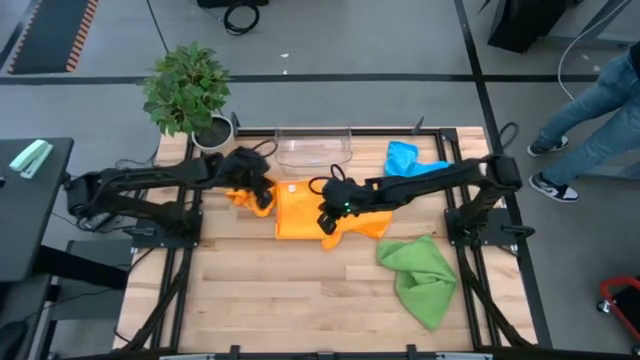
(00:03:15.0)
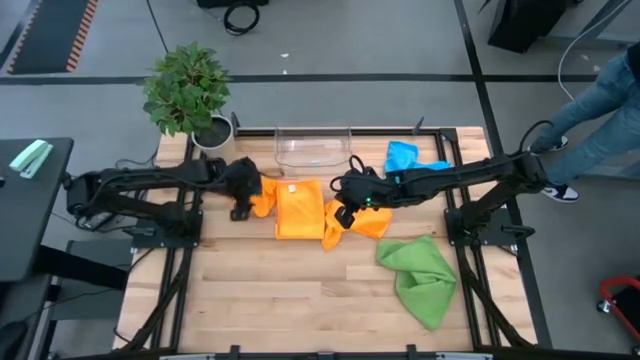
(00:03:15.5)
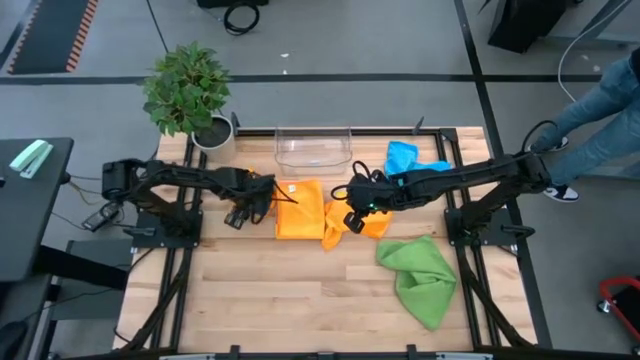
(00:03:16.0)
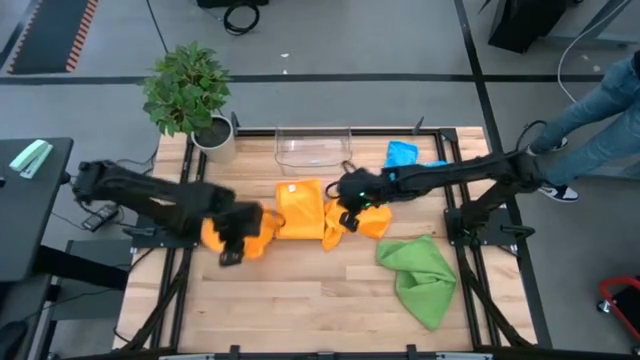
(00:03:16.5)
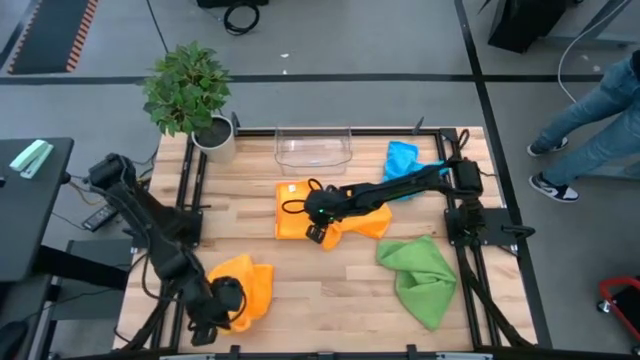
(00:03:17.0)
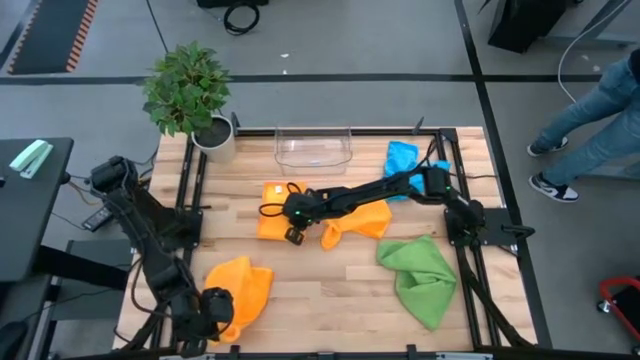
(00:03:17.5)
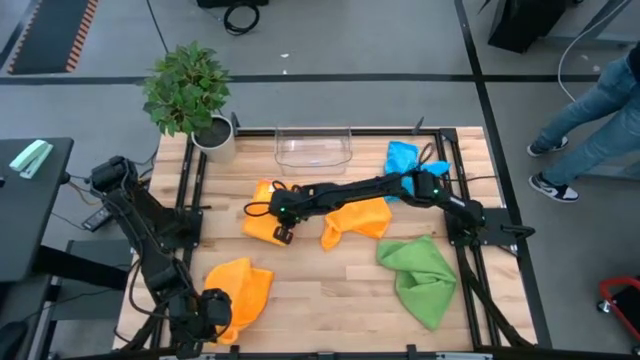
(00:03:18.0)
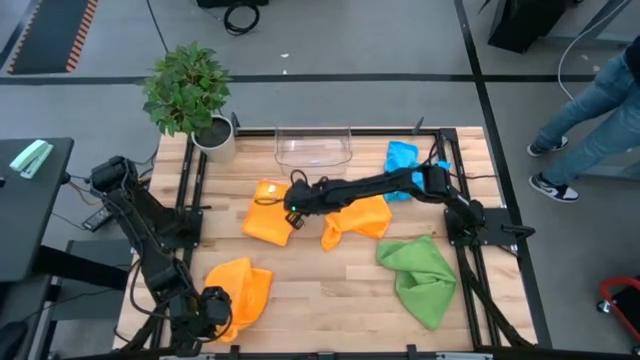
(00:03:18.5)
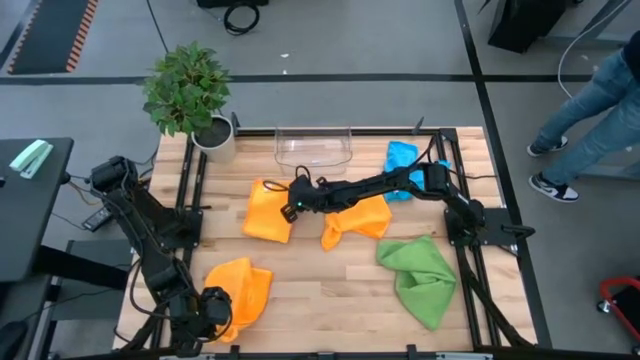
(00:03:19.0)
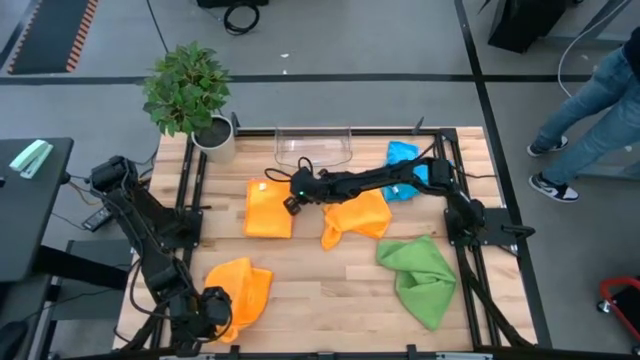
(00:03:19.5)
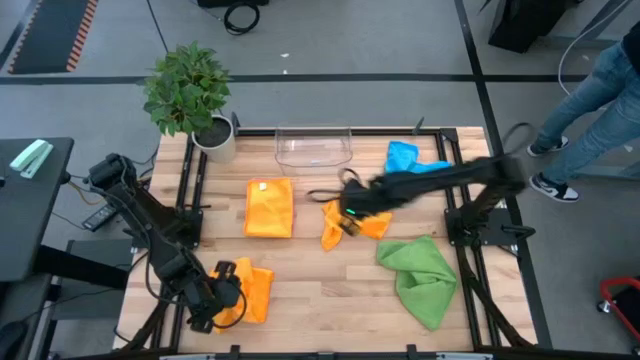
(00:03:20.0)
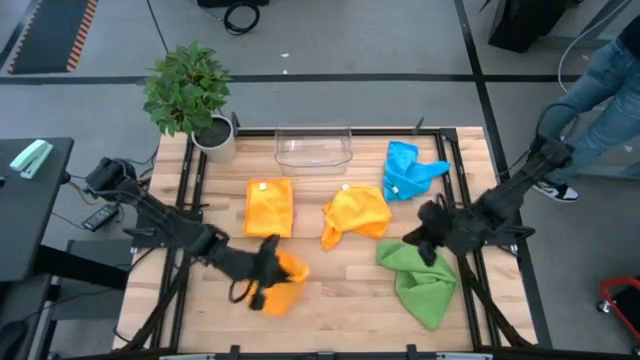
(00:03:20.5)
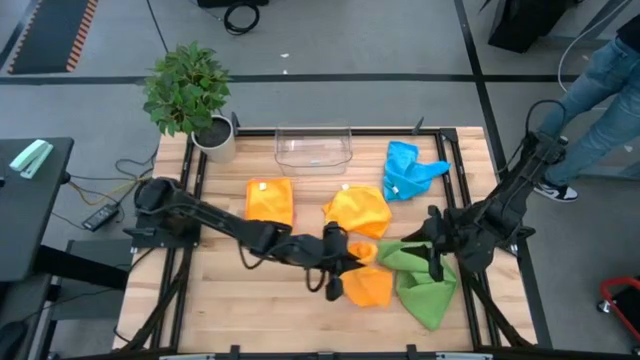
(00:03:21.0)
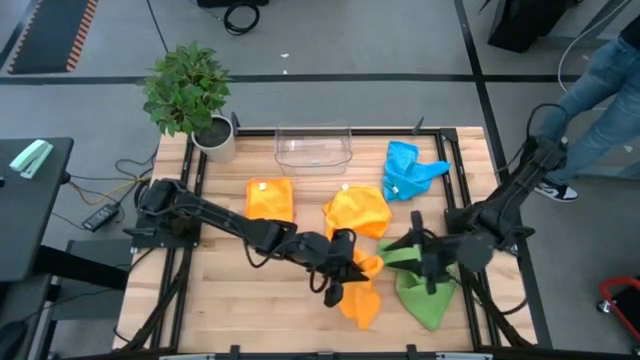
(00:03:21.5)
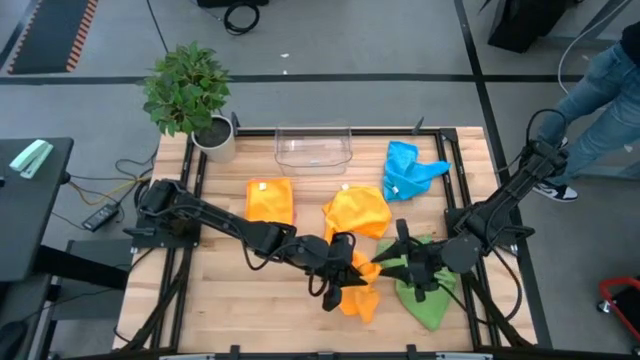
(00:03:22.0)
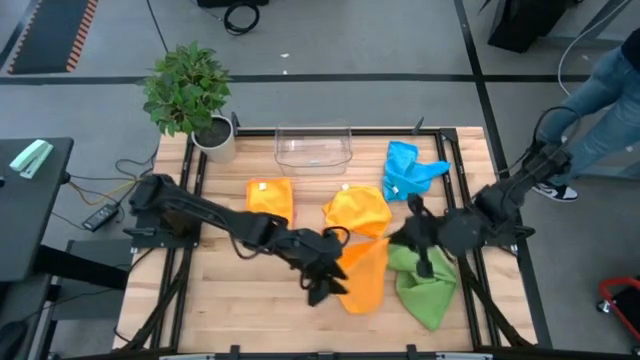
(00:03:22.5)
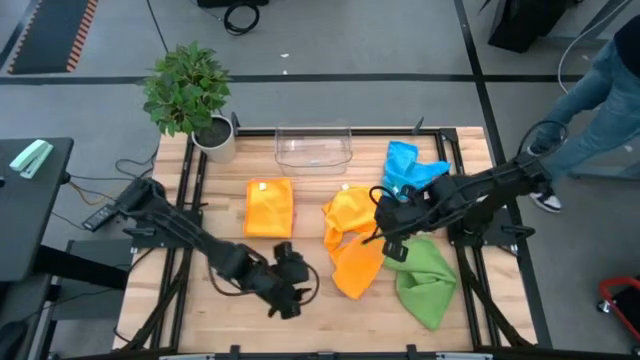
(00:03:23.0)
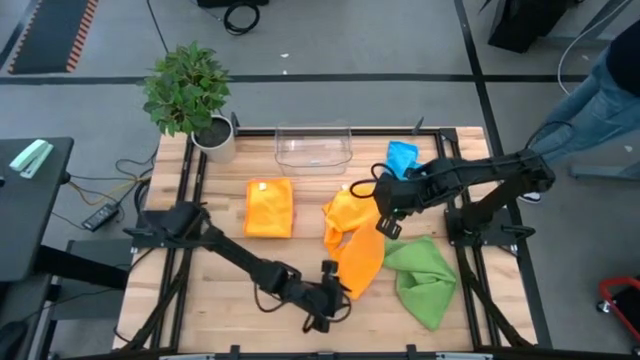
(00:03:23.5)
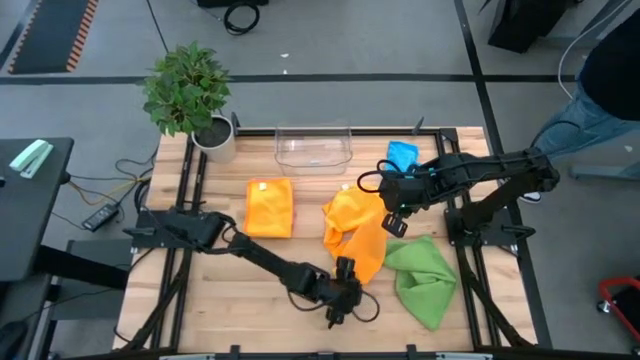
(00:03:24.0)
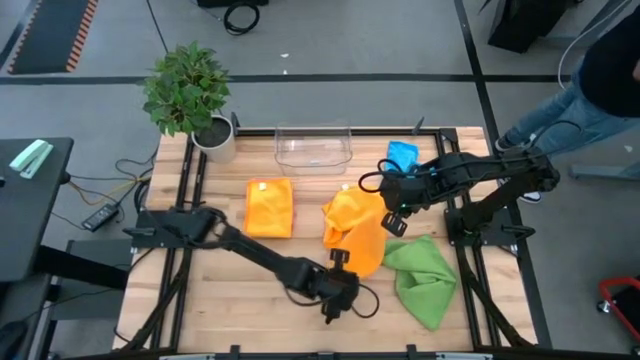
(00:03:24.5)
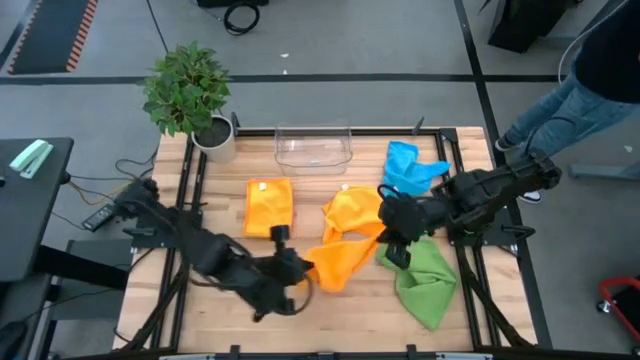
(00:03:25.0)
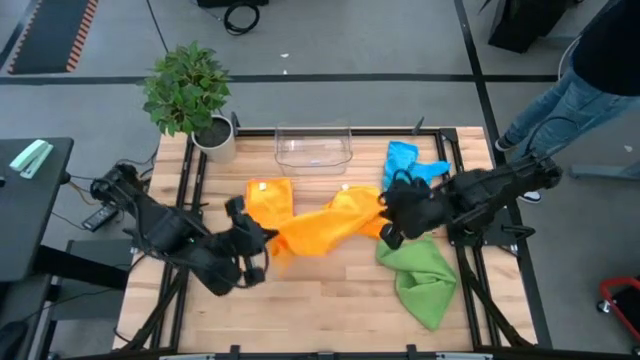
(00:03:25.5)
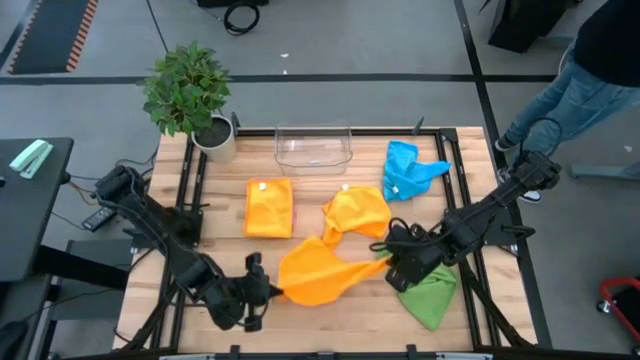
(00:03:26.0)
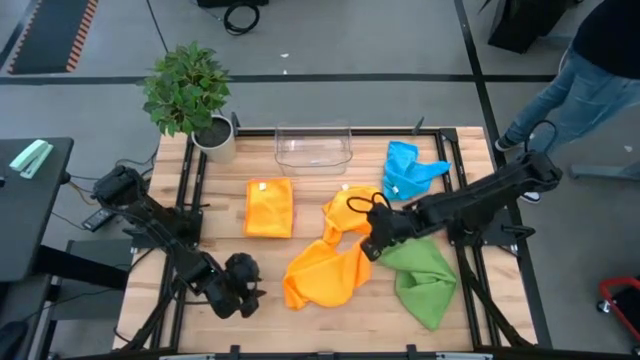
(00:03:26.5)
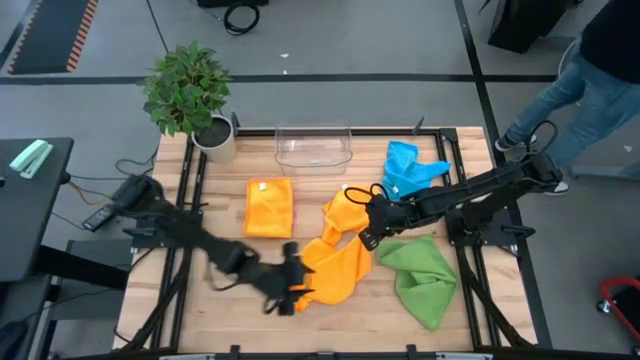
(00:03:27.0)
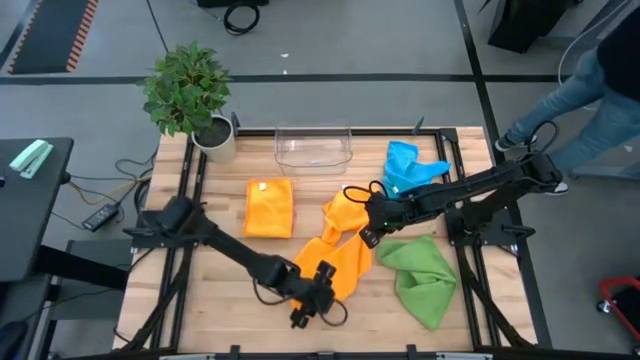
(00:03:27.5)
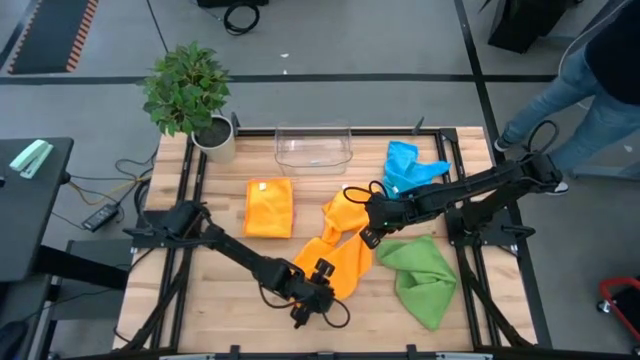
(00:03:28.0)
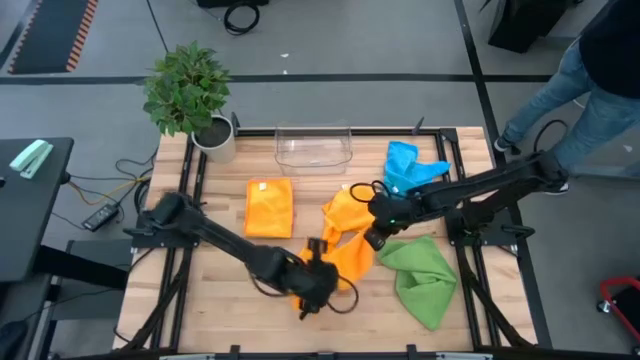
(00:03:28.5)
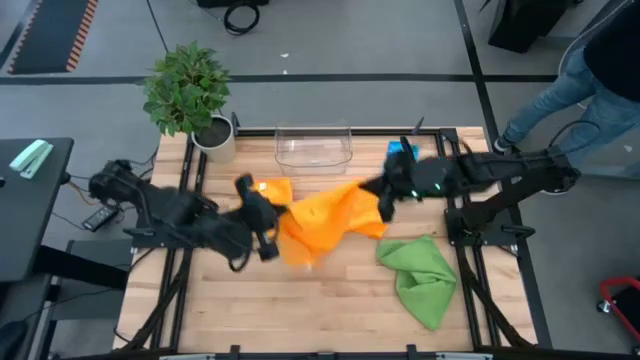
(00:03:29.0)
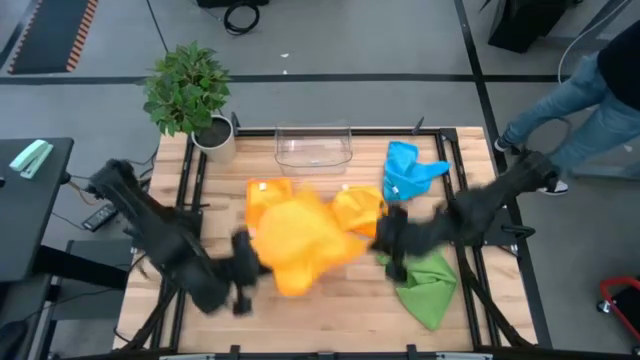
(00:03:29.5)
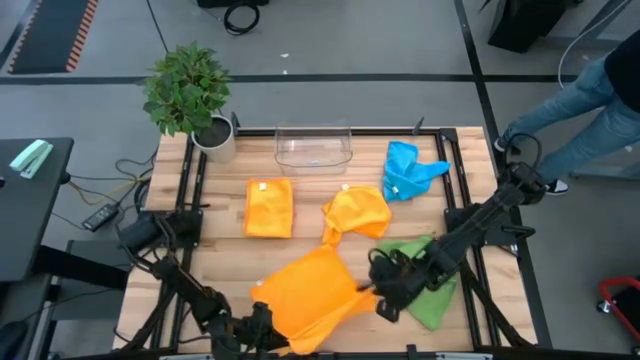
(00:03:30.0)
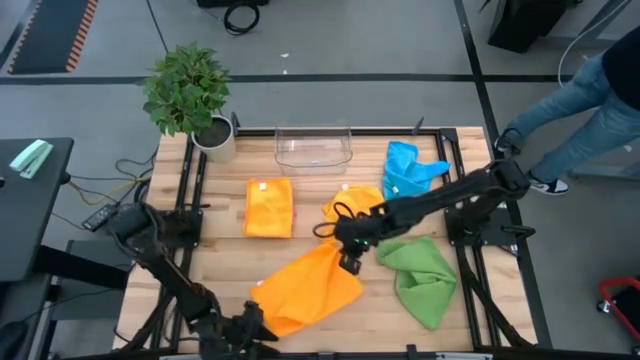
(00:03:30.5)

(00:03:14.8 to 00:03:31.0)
Task: Fold microfiber towels
Fold the left orange microfiber cloth

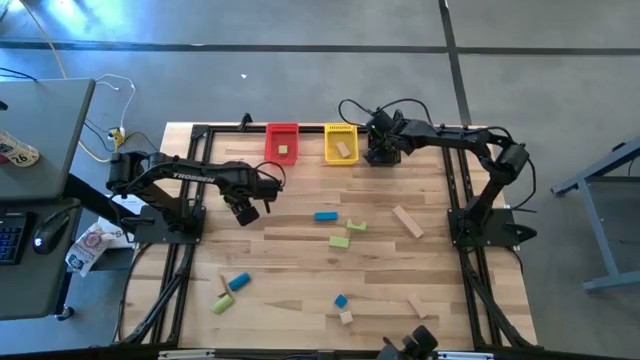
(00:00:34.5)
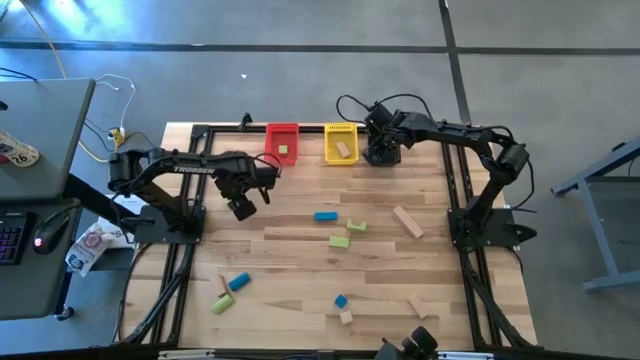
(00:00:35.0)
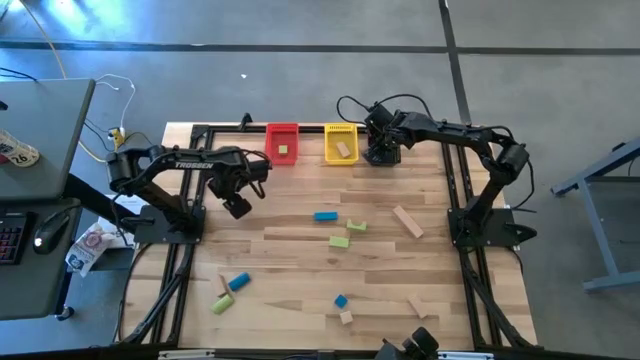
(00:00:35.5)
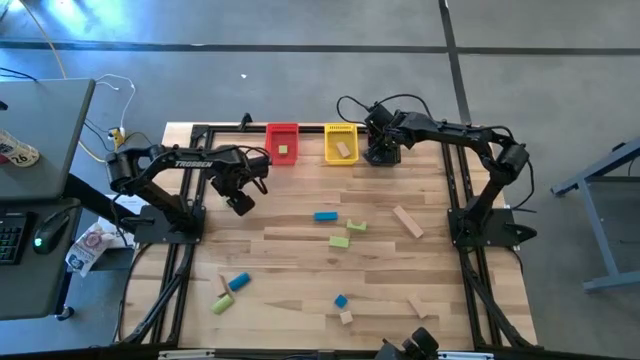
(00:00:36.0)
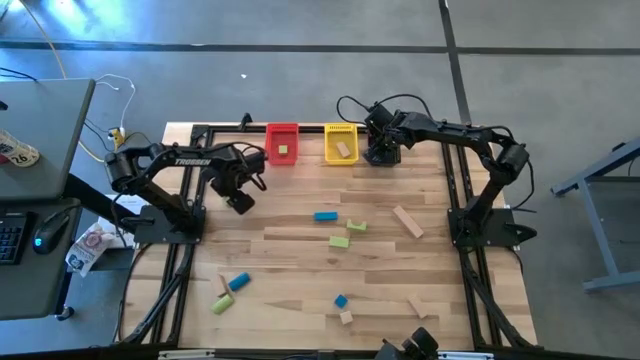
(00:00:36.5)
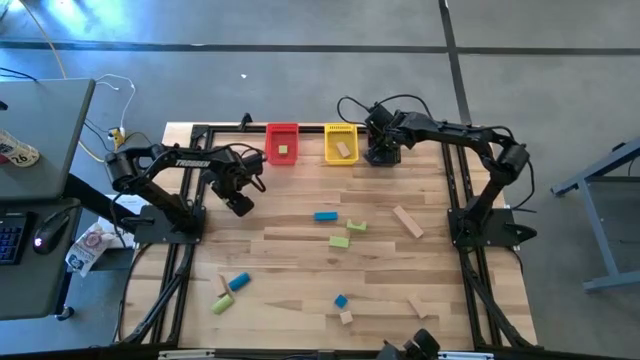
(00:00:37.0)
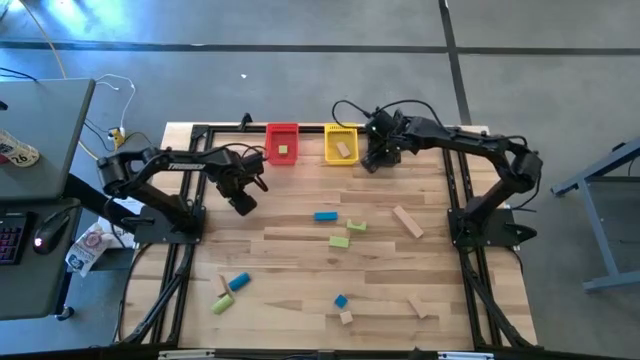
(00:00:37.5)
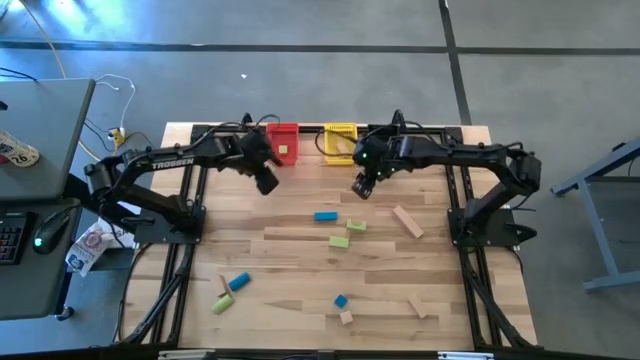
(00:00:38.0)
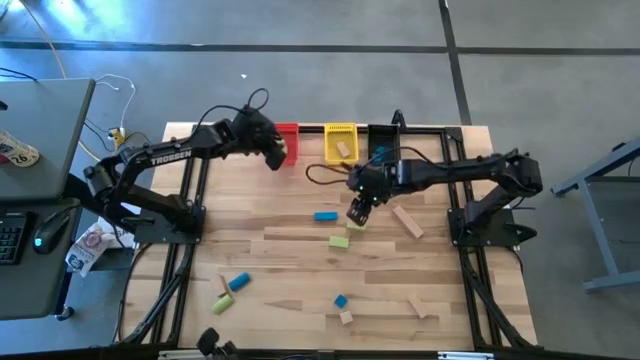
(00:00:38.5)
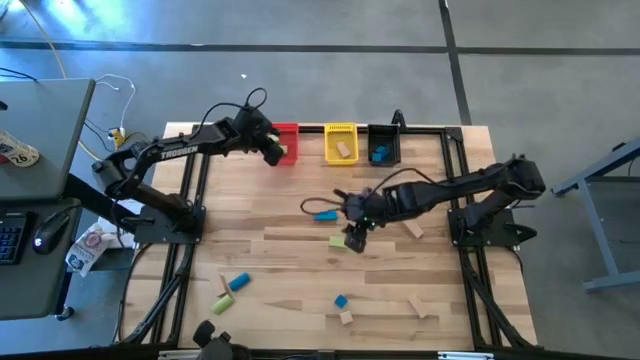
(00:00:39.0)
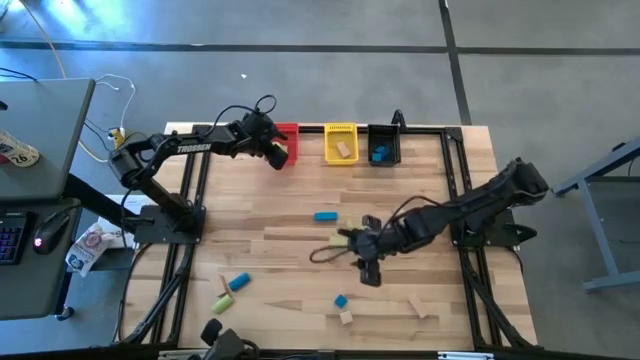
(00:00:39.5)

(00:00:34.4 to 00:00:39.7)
Task: Sort & place blocks by color
Put the green block into the red bin
